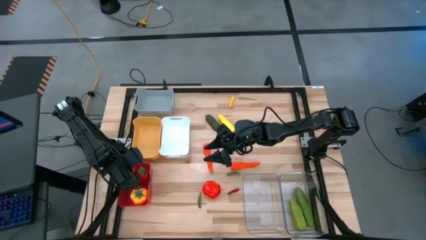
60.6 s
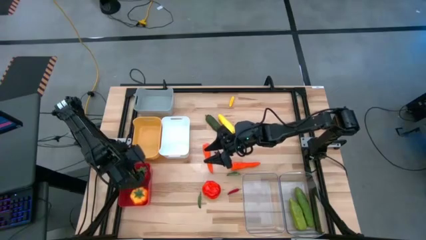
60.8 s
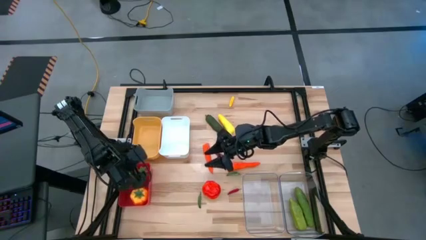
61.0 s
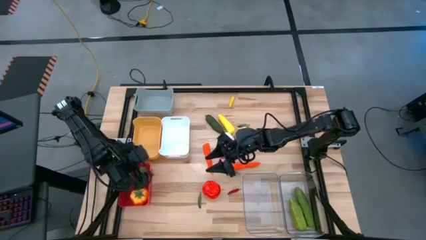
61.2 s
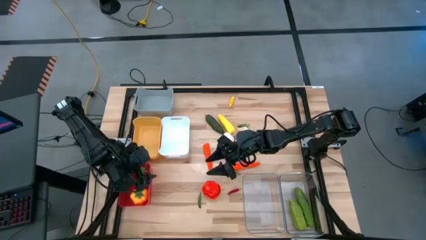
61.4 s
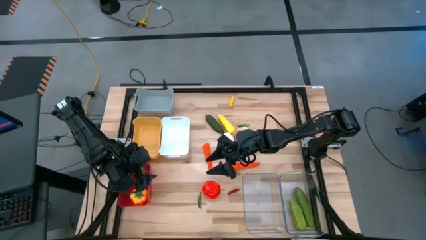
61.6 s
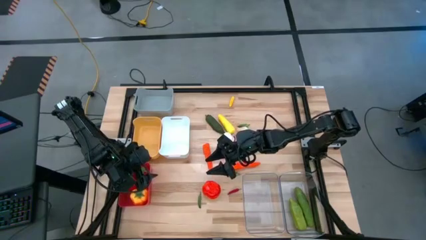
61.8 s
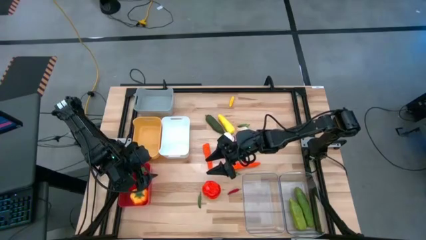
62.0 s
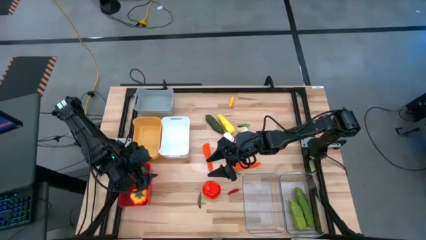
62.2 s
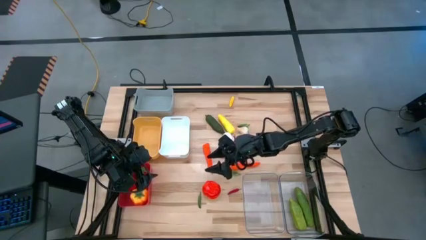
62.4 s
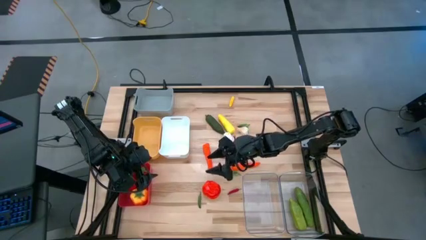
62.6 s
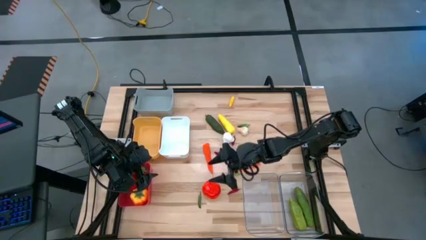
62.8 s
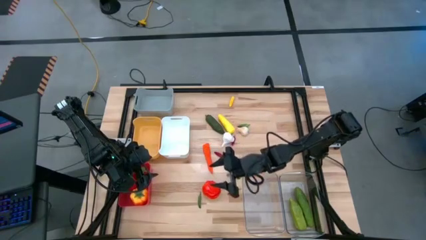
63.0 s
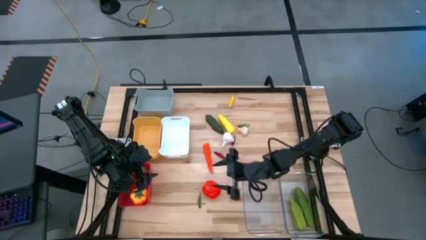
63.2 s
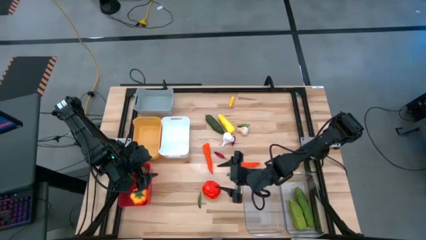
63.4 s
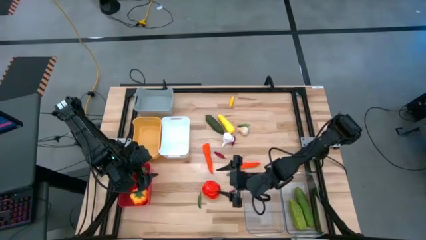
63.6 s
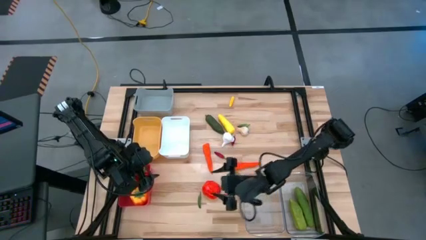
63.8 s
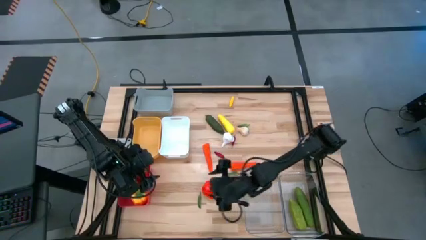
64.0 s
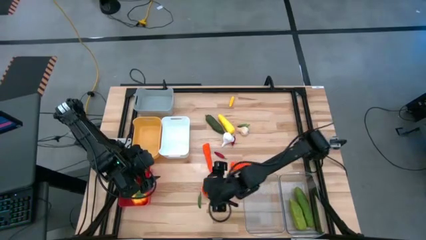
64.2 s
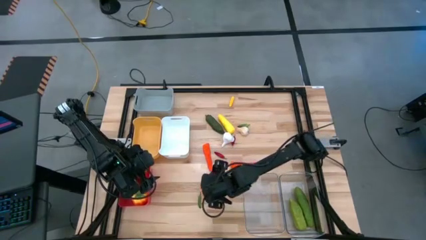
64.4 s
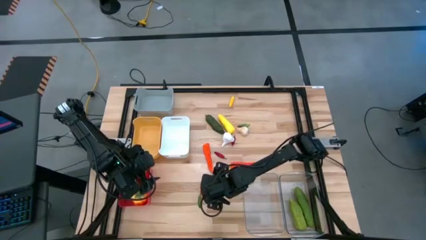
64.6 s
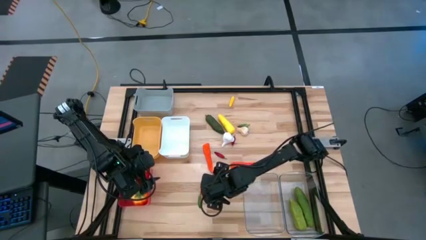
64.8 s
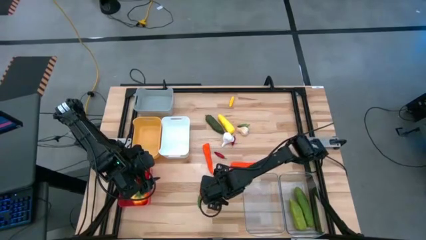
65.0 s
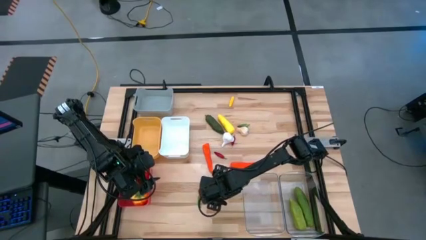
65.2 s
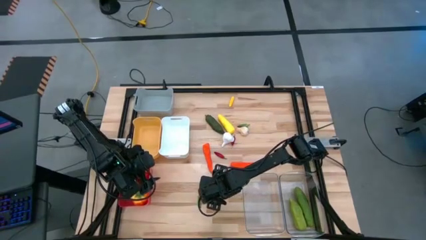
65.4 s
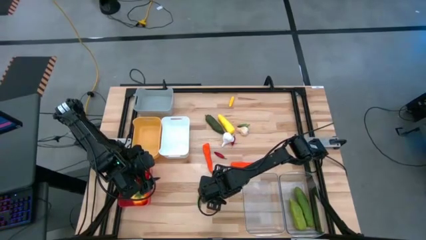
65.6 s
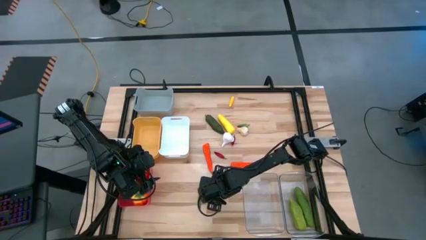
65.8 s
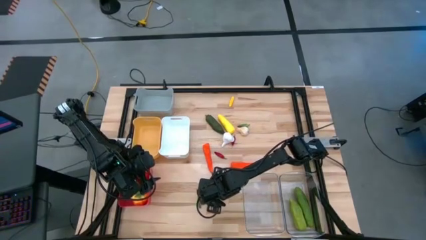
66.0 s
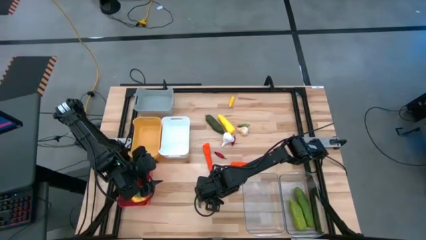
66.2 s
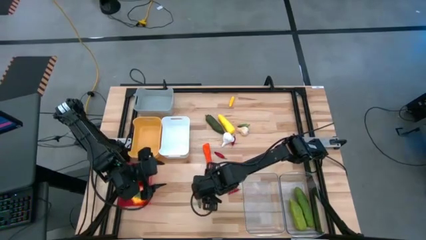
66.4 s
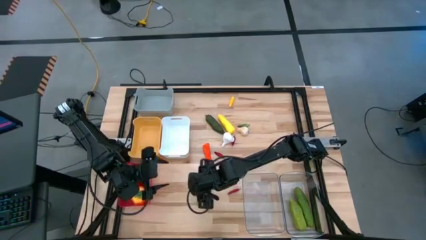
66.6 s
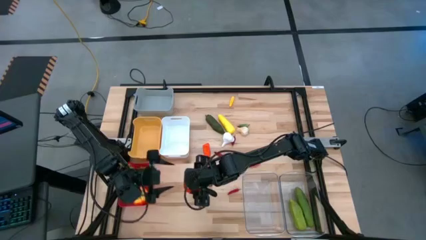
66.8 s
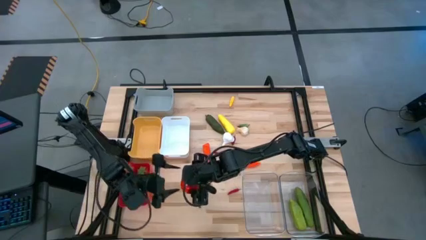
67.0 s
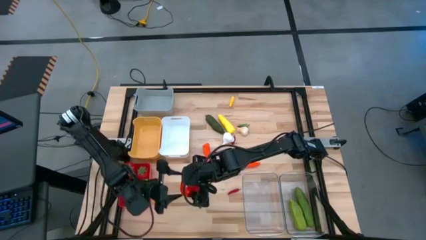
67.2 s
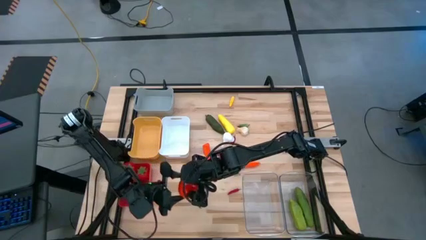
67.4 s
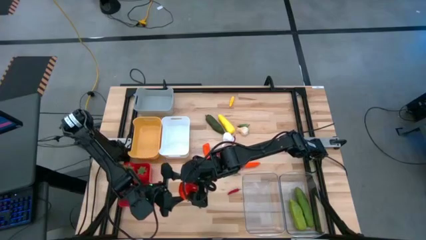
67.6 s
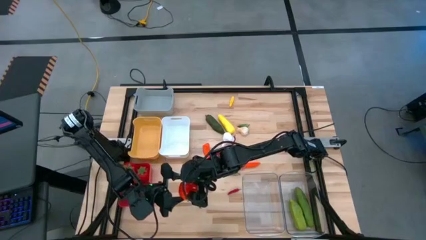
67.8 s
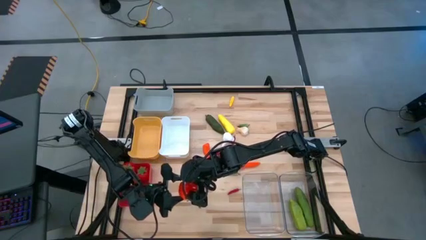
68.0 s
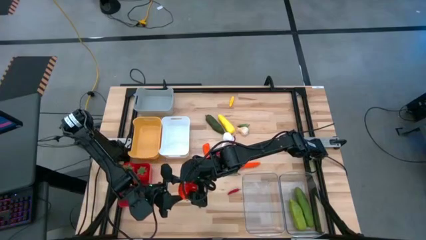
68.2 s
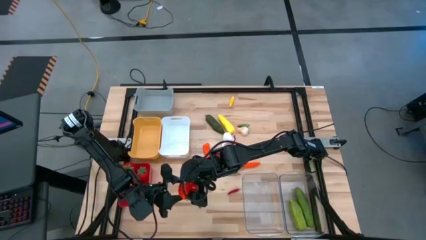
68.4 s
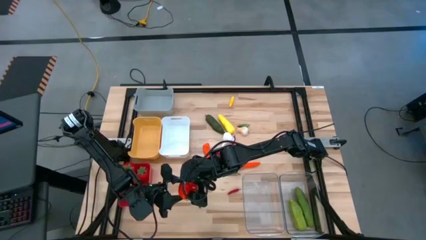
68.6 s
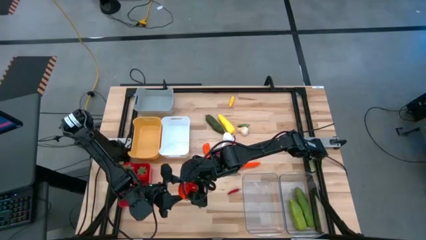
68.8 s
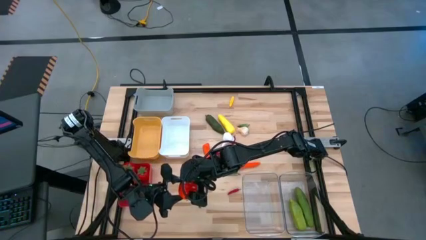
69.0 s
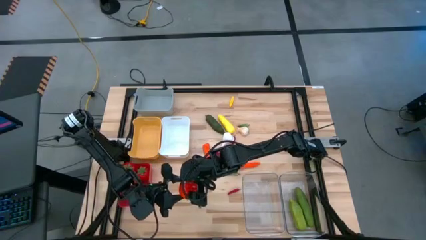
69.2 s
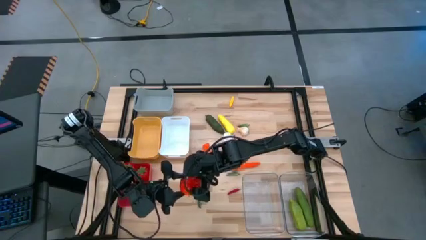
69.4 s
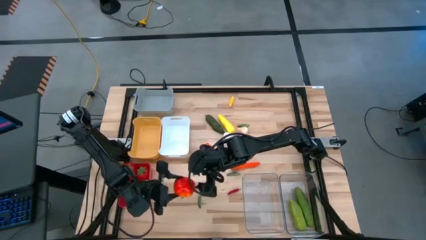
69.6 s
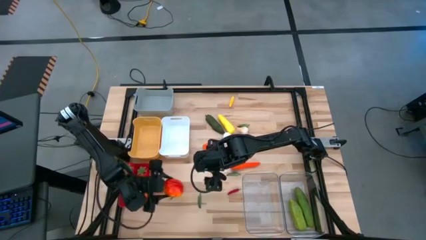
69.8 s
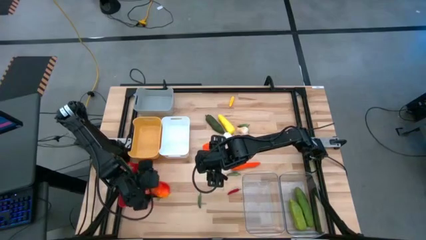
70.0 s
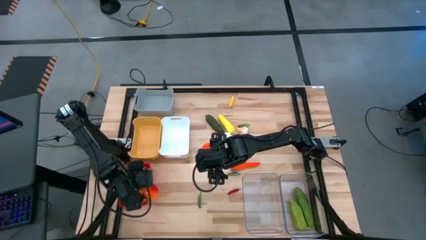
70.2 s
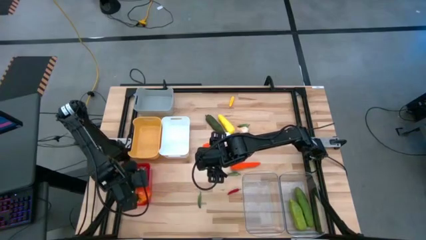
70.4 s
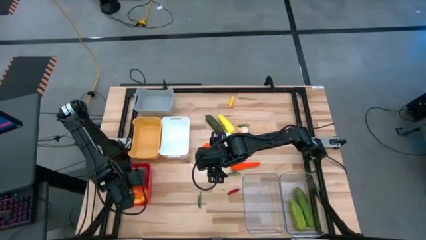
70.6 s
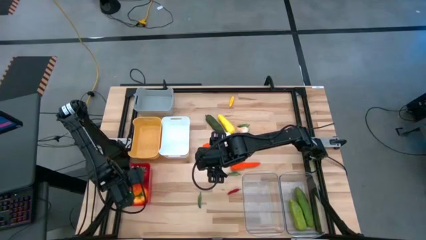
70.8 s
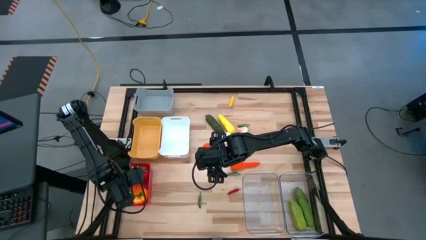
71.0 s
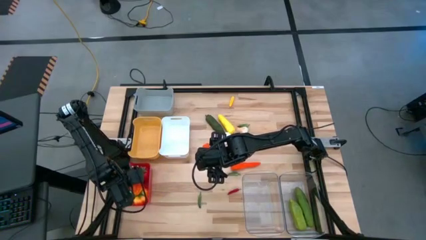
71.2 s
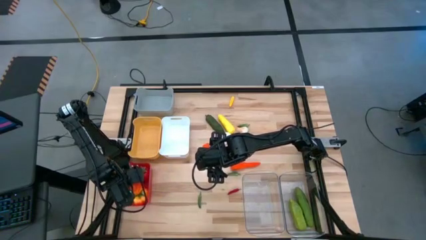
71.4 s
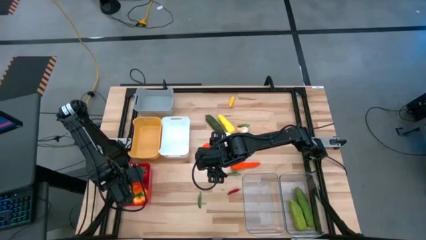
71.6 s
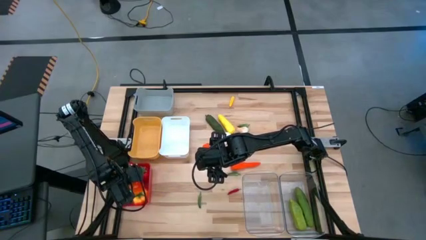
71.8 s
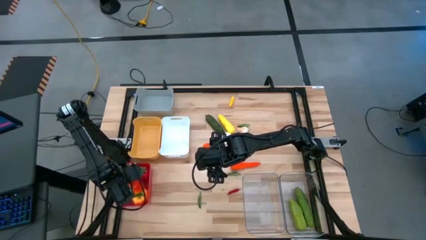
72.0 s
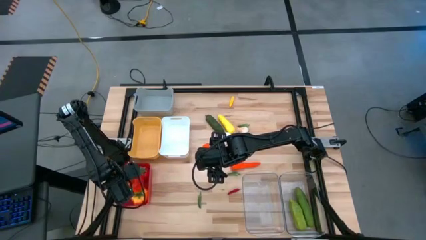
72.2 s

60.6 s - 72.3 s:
Task: Sort produce into baskets
Put the orange tomato into the red bin

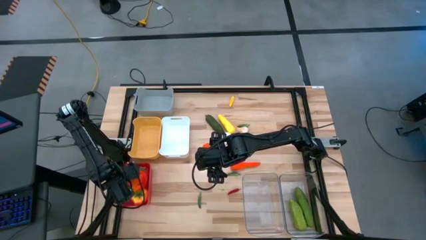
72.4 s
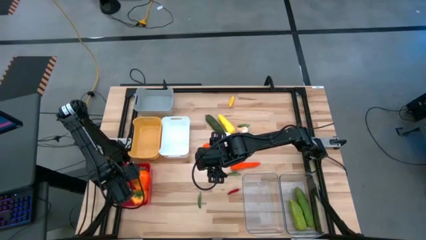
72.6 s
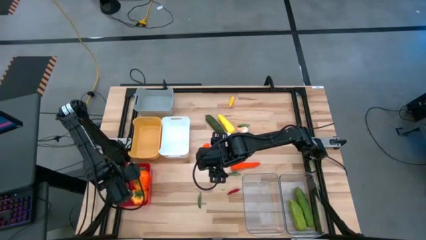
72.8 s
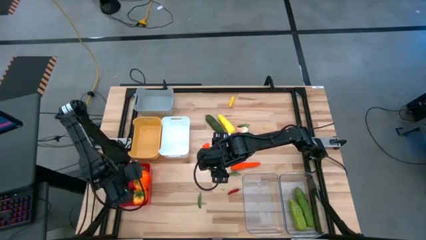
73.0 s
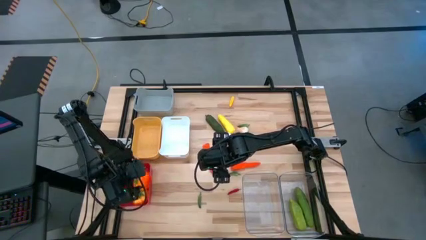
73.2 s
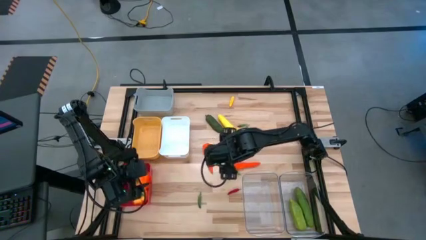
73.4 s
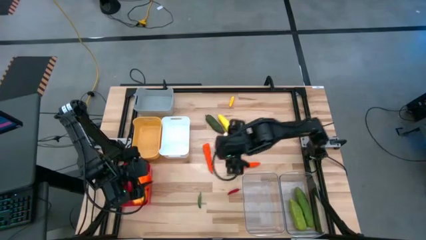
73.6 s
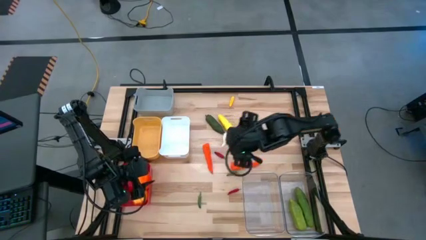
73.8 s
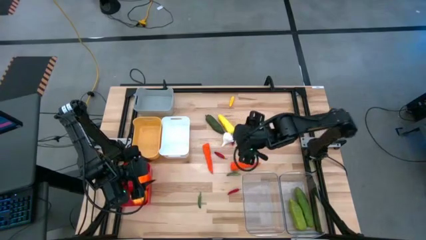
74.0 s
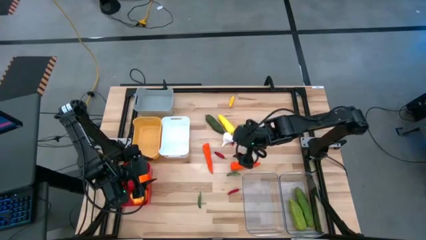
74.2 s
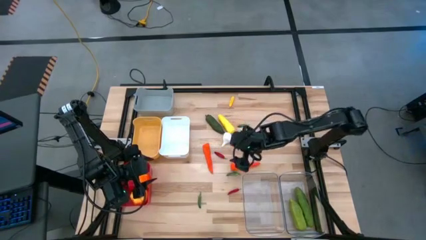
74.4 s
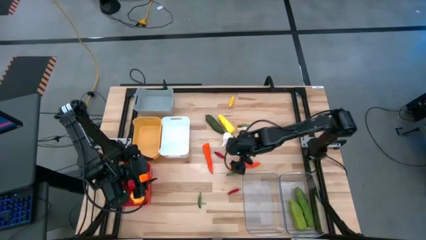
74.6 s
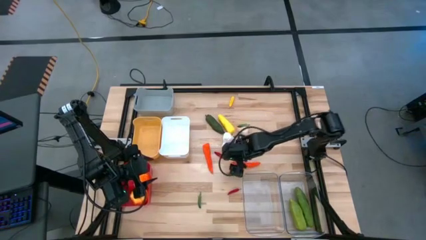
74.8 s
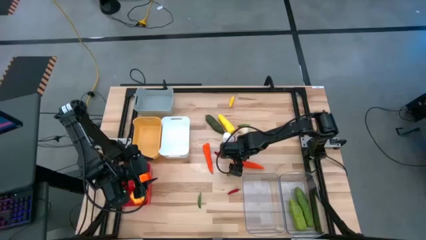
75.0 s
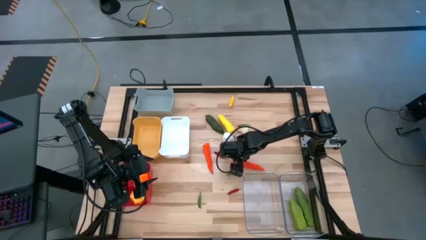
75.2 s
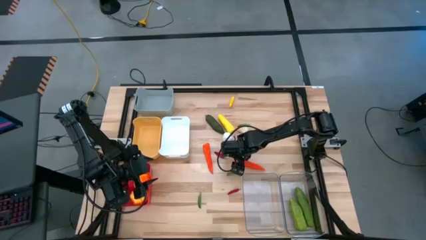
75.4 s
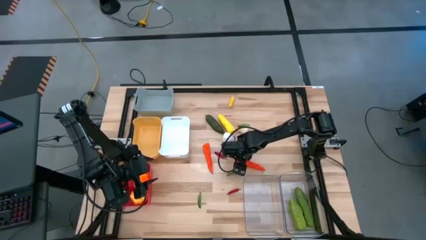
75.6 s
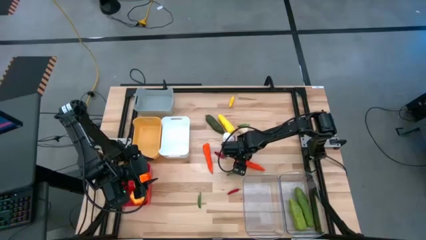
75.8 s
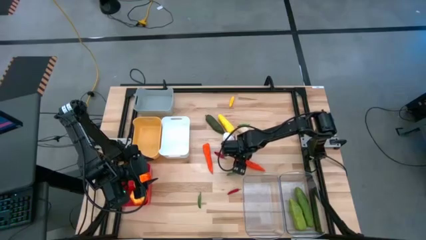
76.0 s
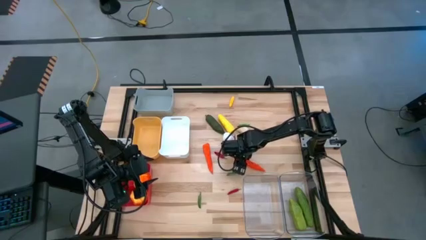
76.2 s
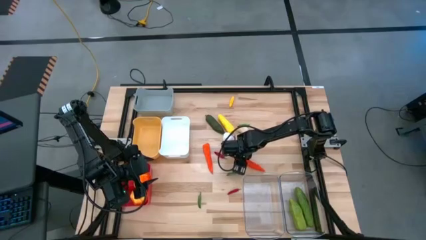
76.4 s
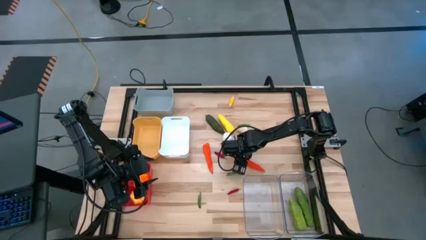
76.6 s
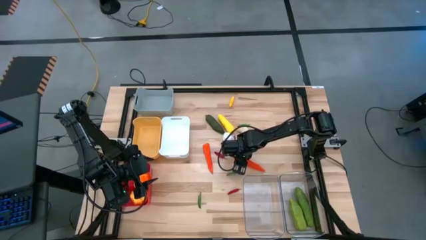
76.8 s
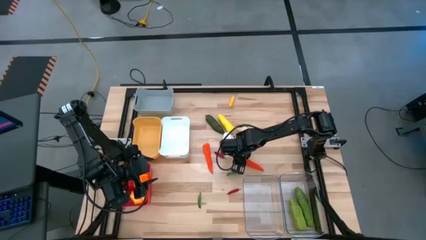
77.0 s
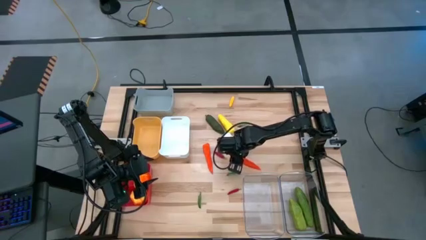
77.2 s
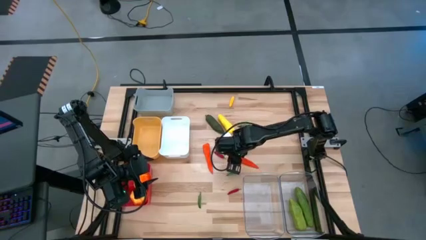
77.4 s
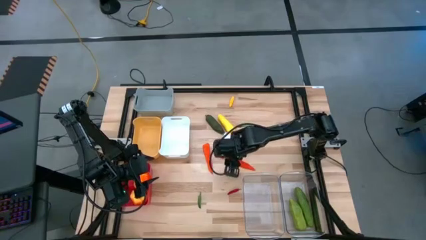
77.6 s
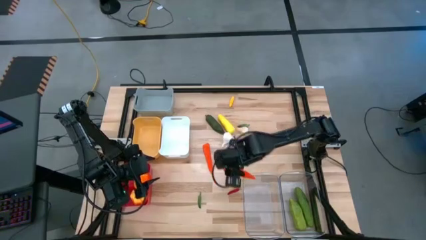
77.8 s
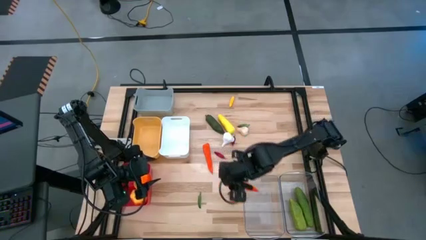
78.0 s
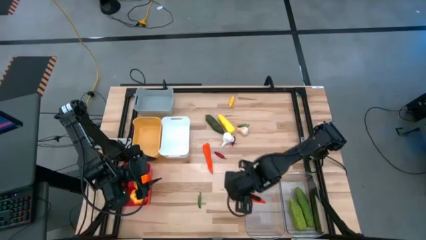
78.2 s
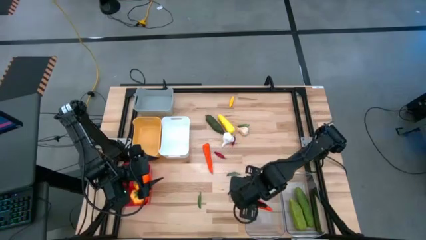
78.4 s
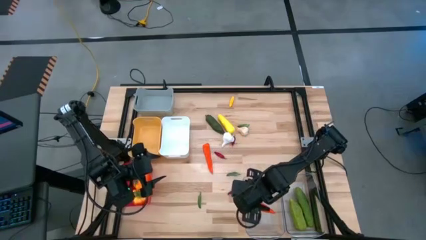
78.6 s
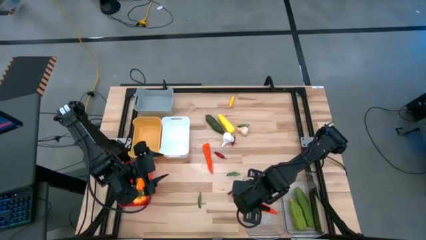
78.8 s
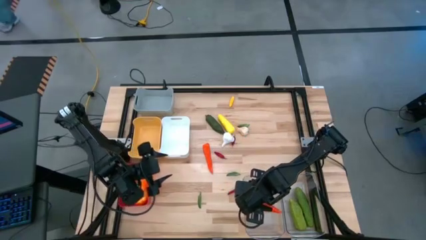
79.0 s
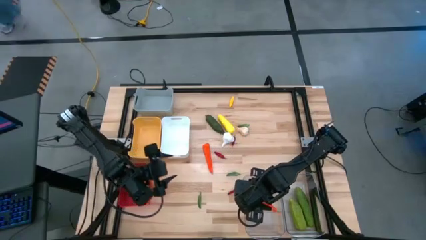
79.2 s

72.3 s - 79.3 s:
Put the right orange carrot into the left transparent bin
